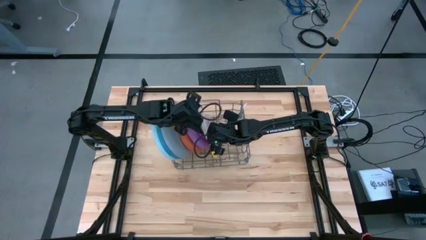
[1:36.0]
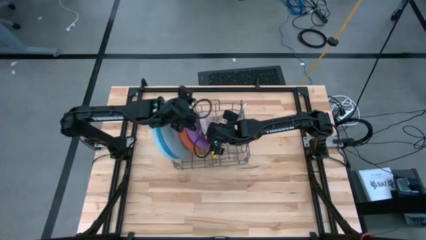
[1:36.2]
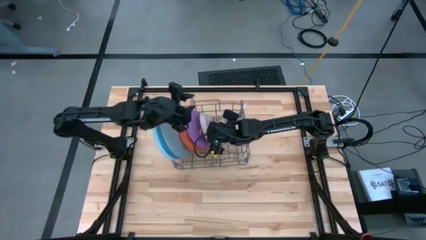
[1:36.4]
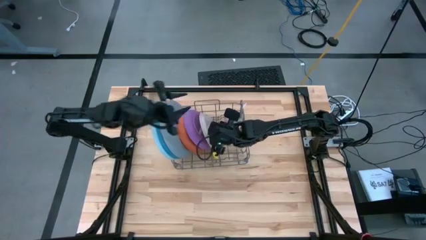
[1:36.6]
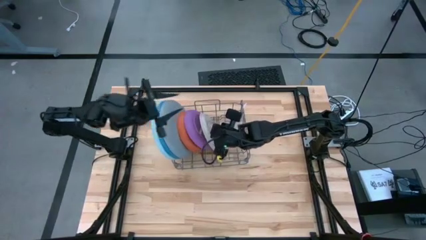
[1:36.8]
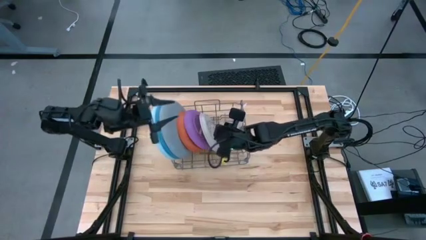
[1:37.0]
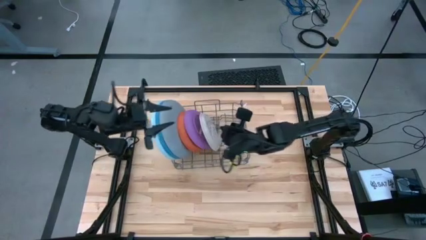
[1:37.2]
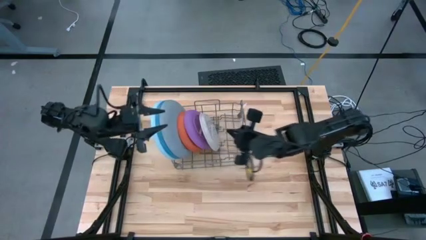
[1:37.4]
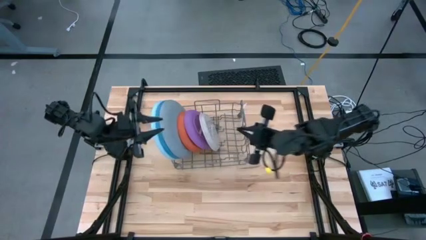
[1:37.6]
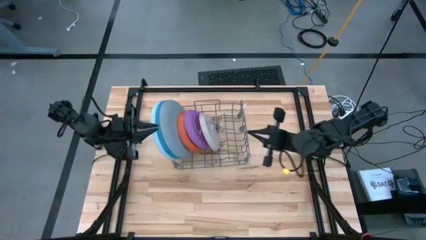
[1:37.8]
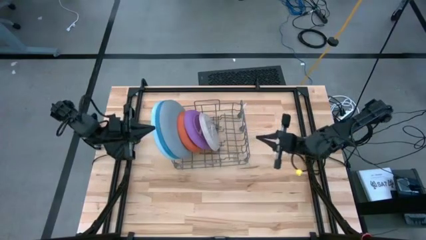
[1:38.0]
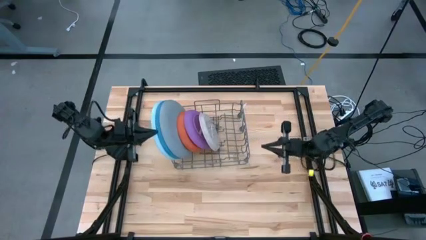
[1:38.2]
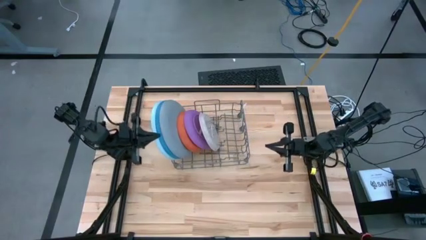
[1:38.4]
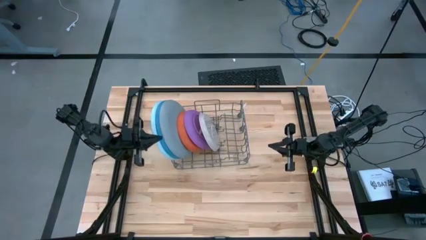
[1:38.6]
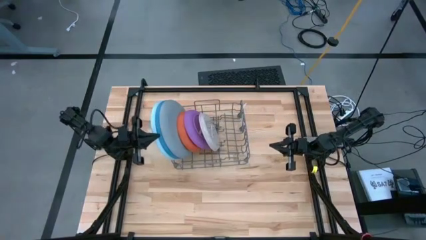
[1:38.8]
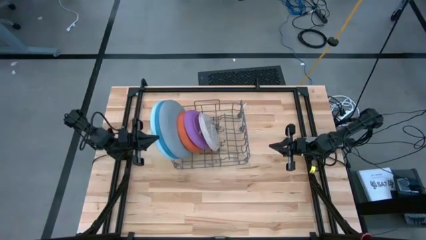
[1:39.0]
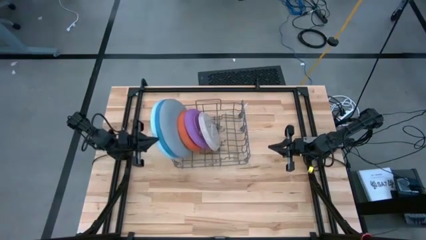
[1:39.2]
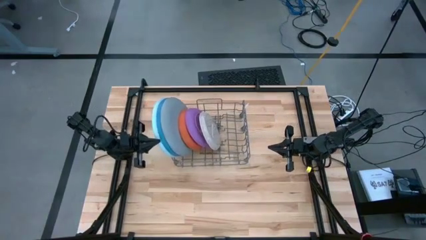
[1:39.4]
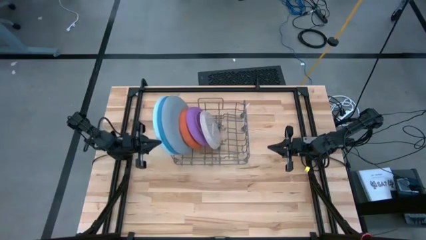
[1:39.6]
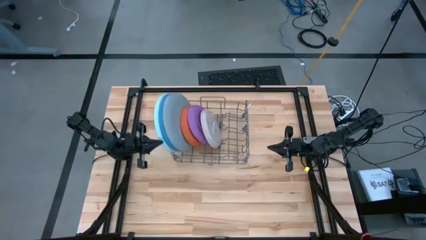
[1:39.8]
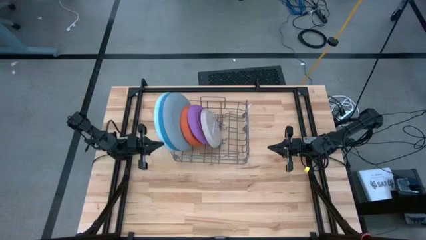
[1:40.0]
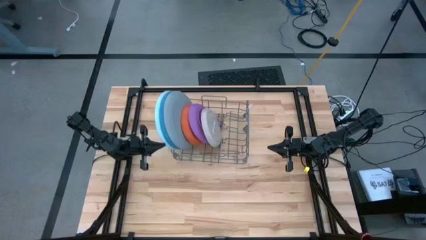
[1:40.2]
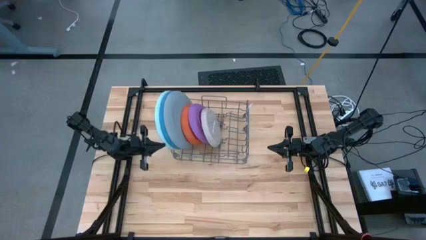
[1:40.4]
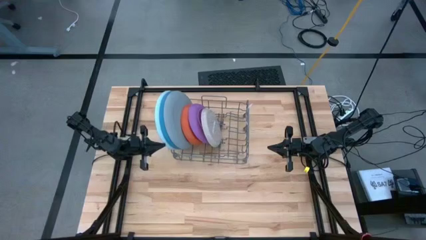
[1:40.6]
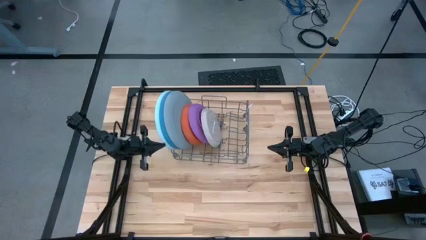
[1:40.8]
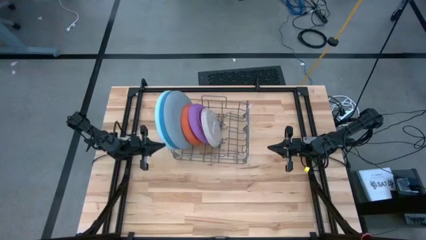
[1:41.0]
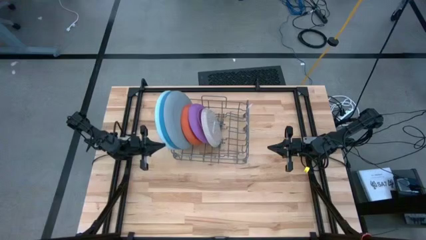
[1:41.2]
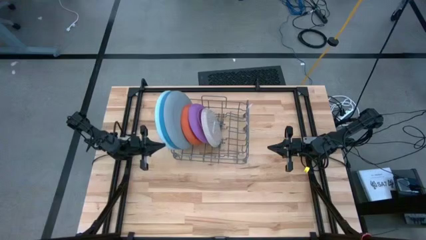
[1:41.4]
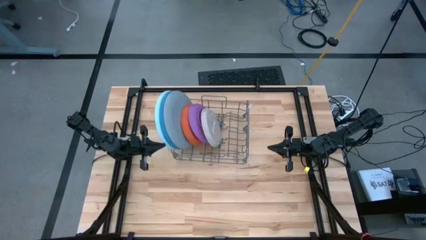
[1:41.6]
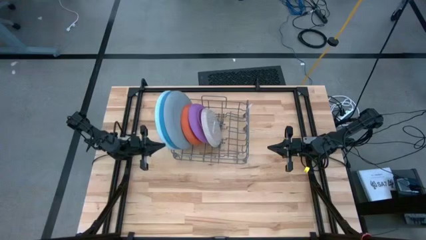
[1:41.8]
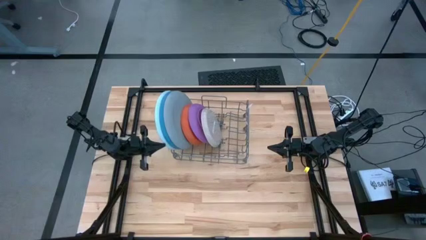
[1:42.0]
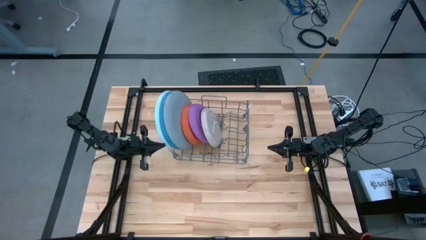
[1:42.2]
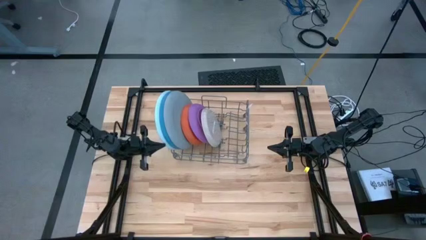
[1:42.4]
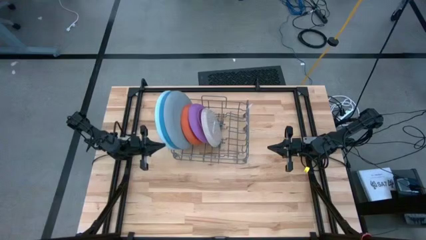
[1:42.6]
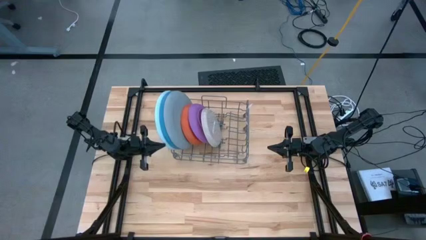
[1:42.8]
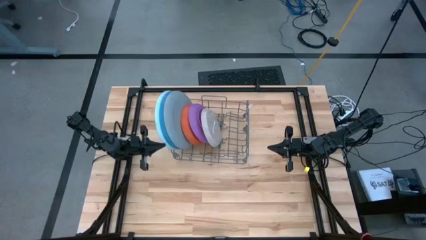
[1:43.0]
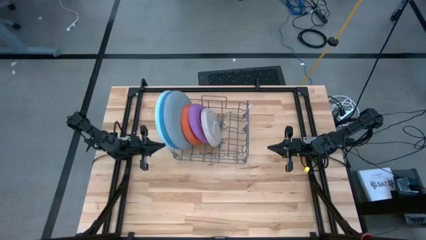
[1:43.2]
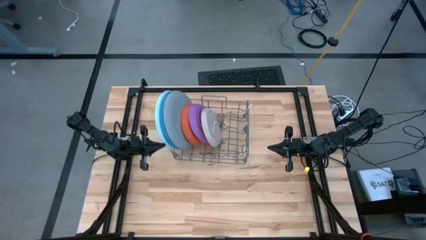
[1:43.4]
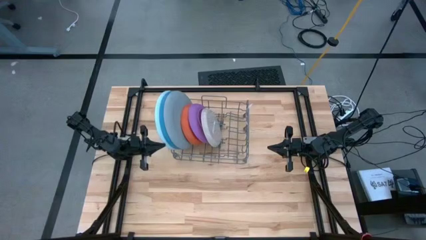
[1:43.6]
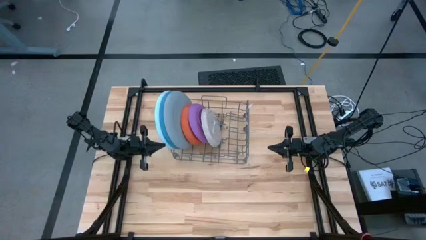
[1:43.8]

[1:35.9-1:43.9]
Task: Sort dishes
Return to Home Position

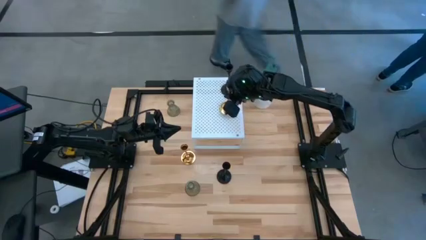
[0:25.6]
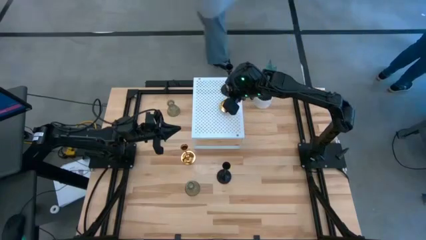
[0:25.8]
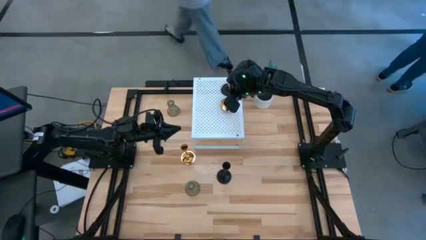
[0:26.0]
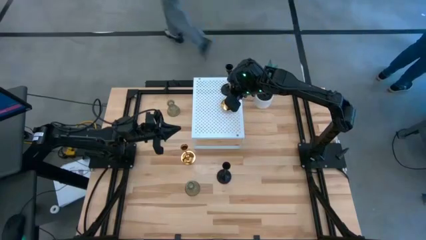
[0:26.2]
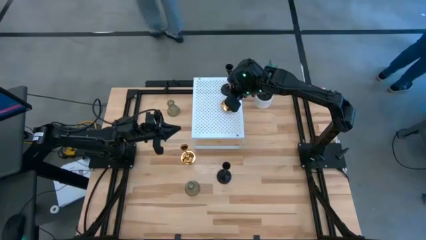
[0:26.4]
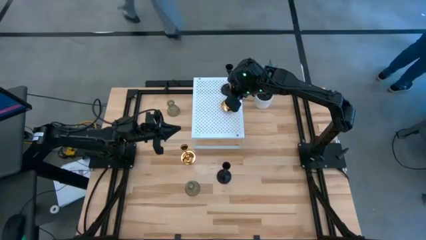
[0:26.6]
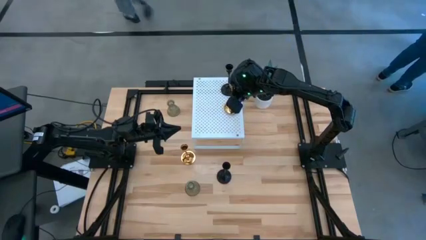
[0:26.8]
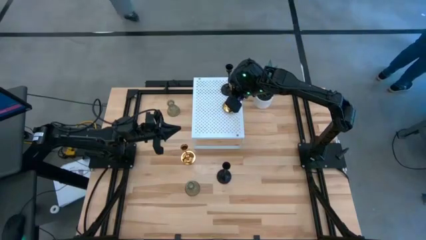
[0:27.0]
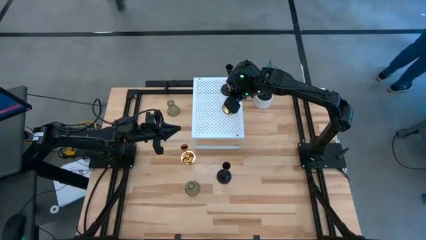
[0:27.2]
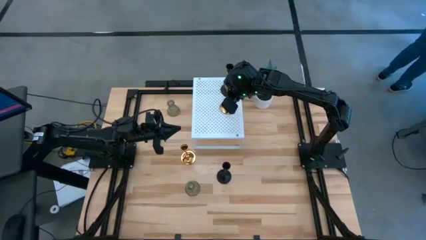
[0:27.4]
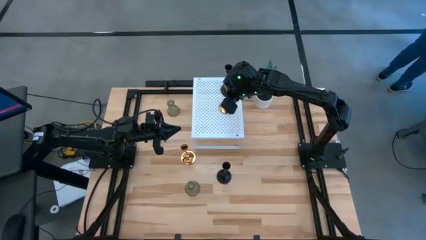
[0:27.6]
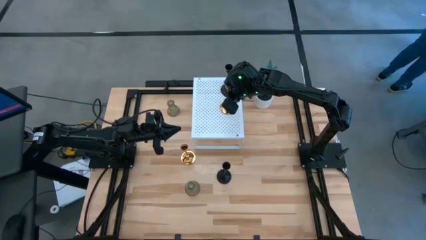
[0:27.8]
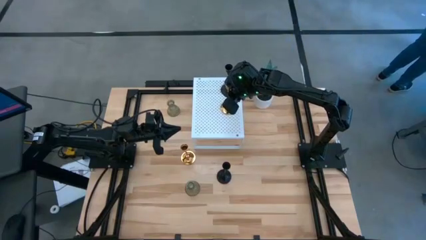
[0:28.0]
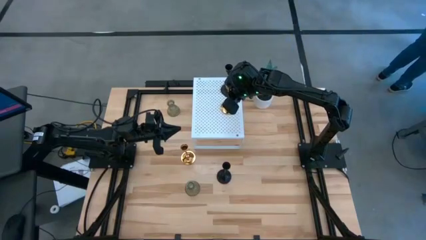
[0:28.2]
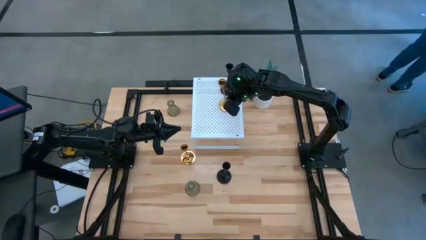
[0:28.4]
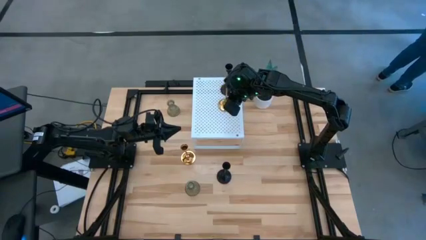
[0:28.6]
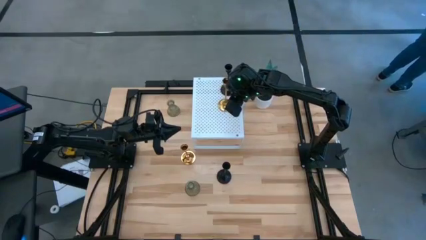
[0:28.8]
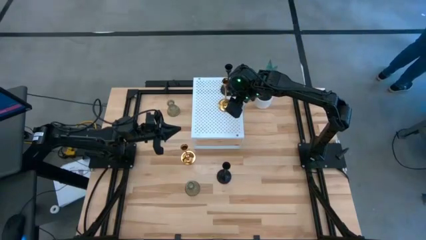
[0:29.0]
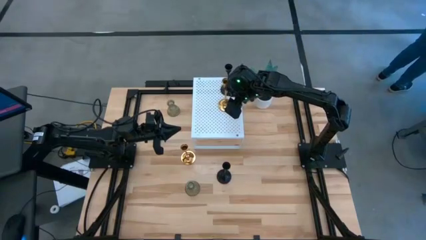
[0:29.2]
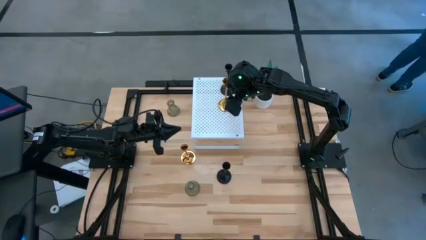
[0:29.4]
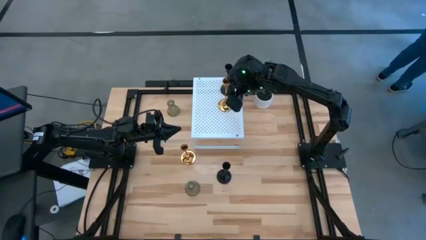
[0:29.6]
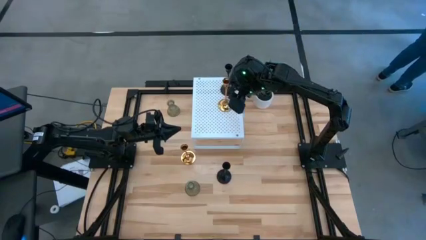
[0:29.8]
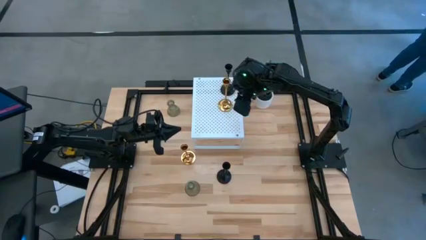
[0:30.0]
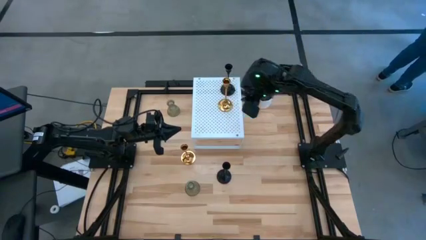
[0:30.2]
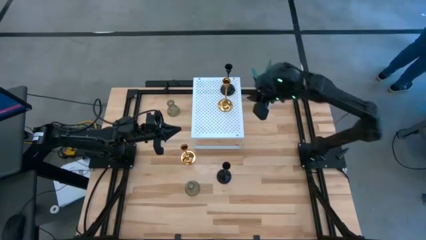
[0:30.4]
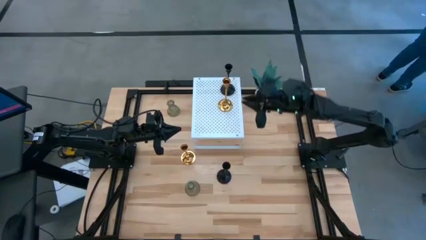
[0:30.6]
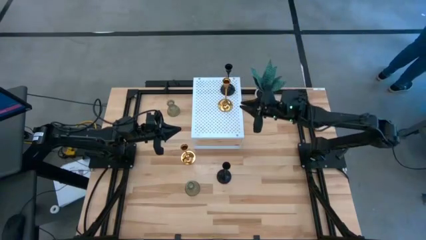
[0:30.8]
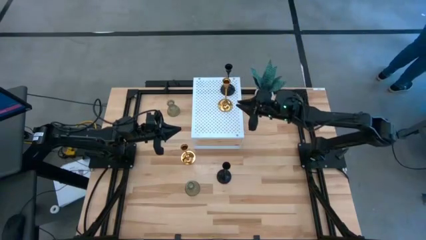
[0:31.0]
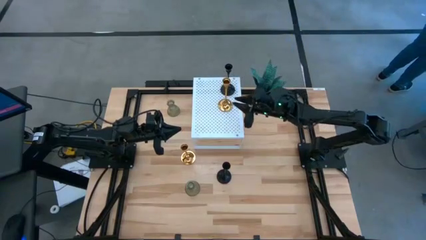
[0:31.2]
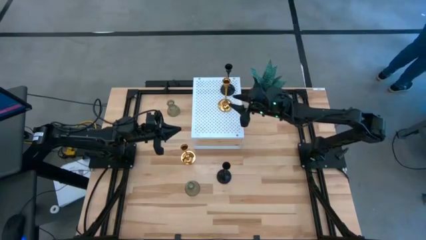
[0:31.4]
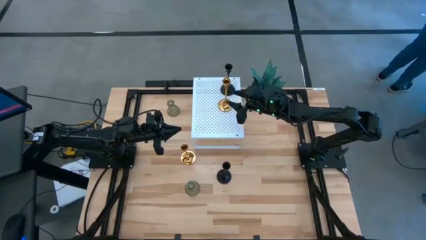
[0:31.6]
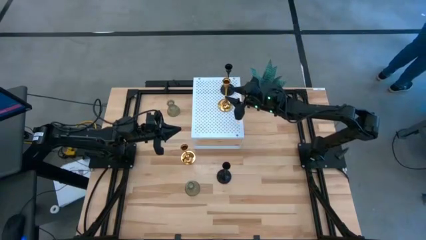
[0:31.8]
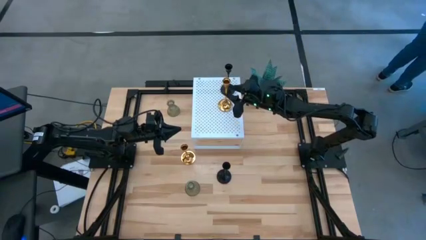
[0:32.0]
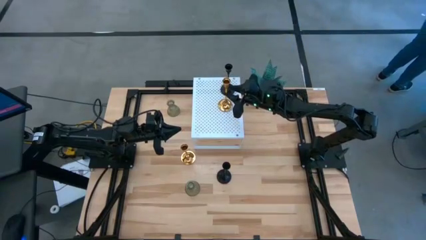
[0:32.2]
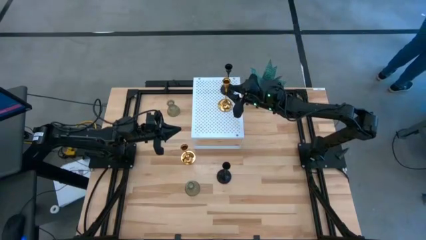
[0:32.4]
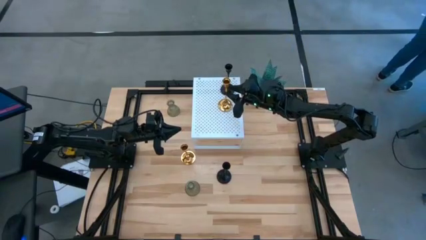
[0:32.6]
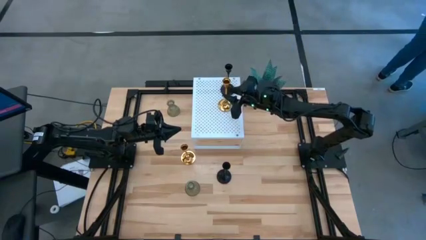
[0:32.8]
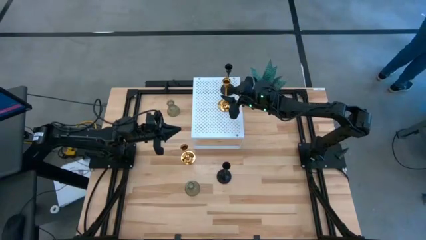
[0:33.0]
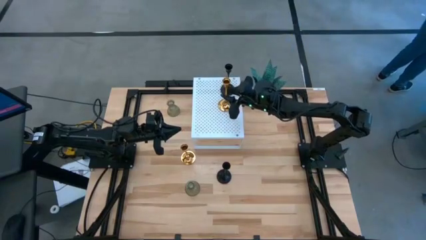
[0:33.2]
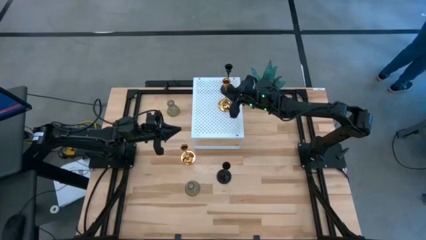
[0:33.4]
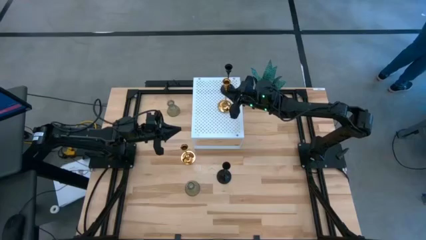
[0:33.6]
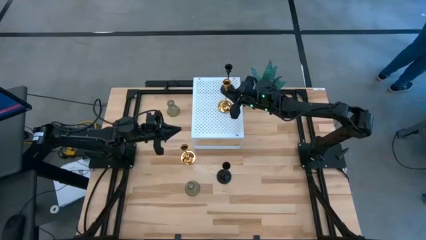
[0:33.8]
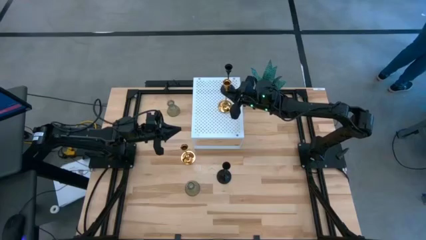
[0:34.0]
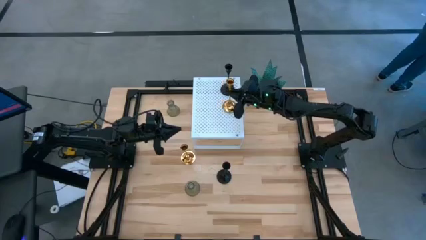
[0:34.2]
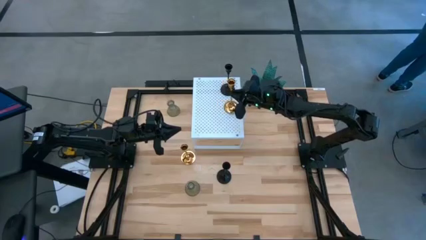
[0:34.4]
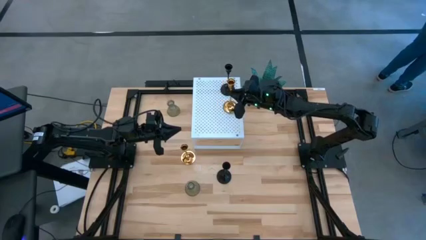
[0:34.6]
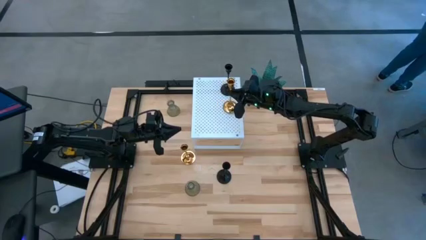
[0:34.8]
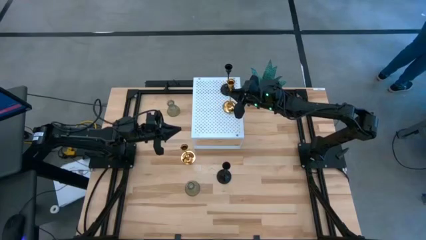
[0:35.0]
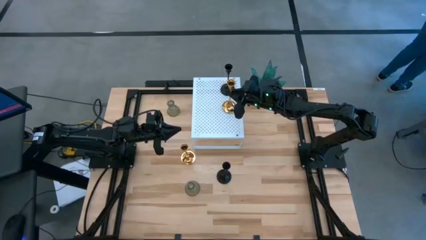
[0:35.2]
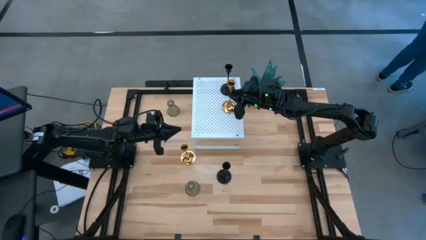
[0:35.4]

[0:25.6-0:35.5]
Task: Pick & Place candle stick holders
Put the right gold candle holder on the shelf
